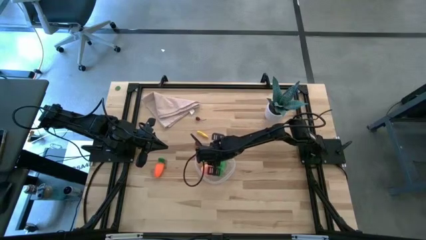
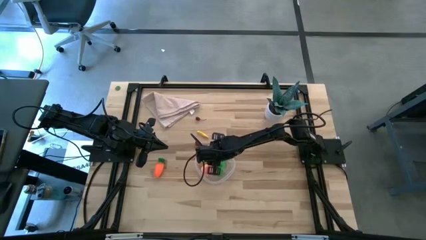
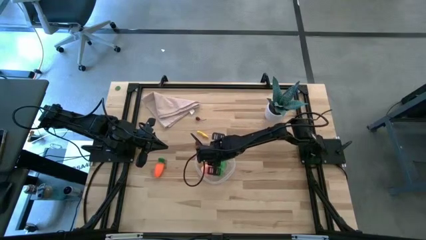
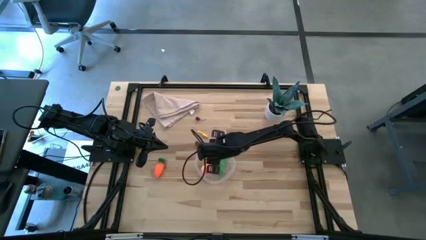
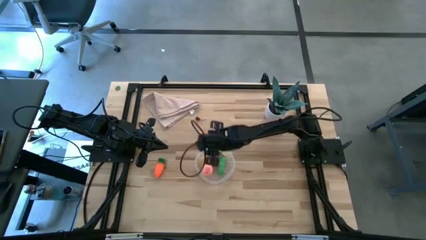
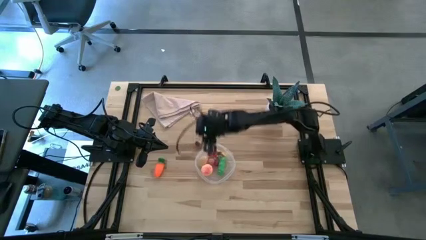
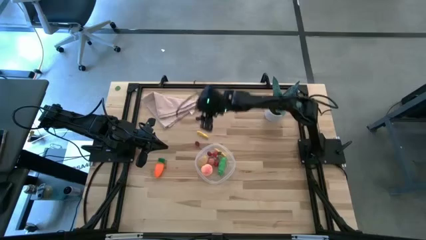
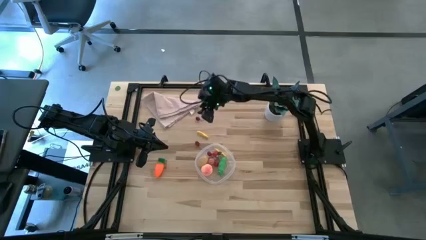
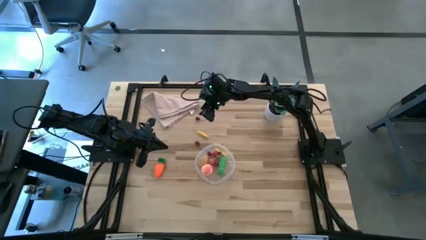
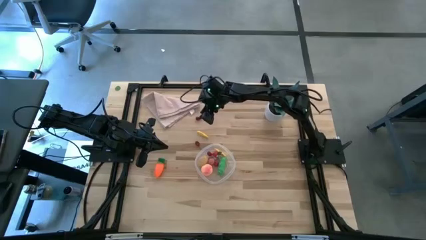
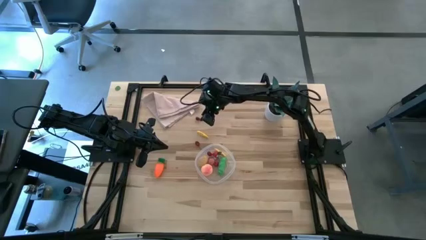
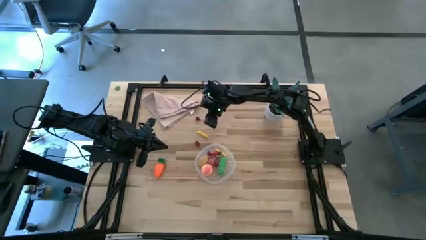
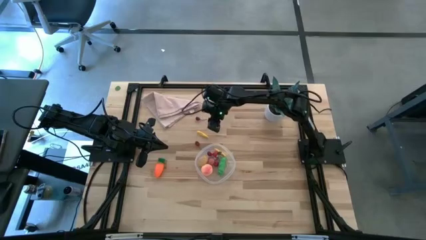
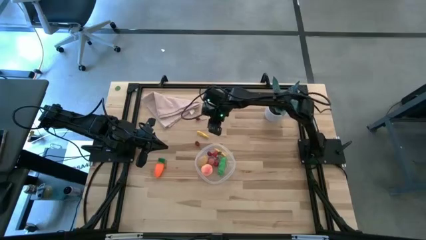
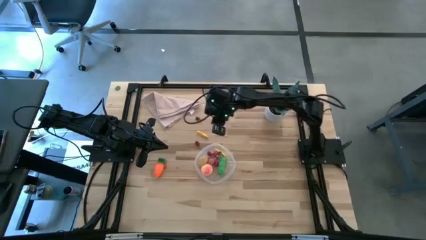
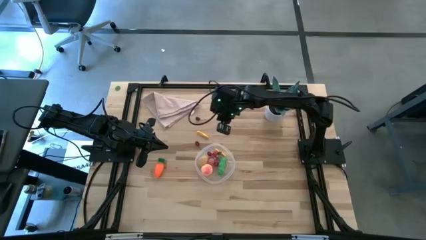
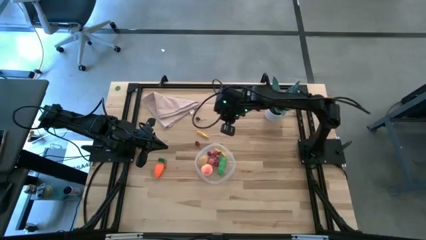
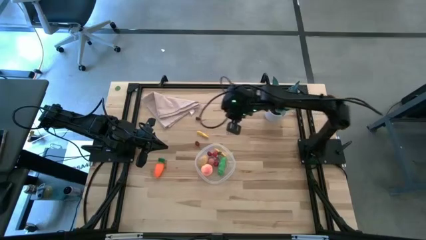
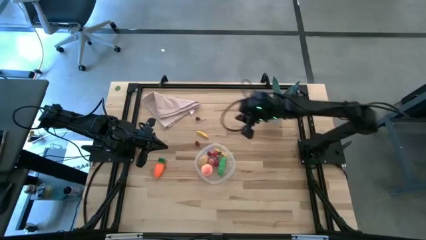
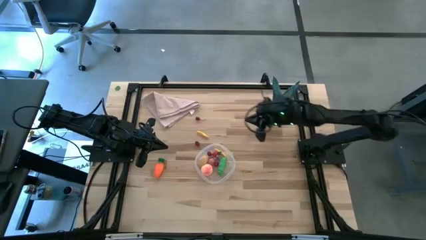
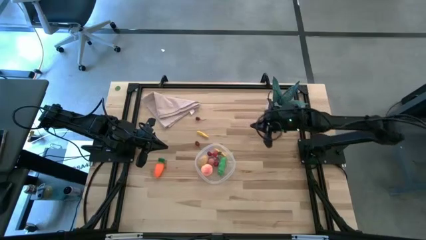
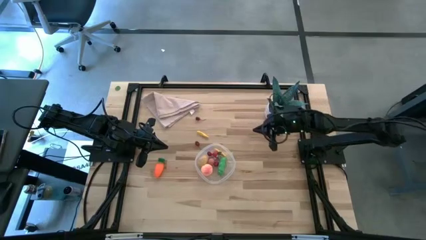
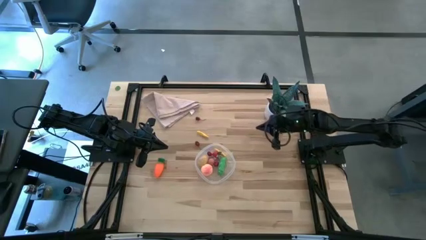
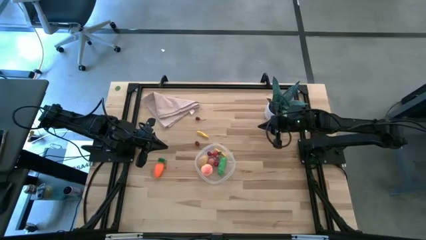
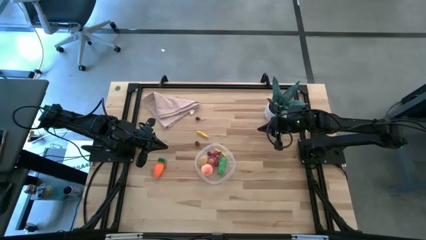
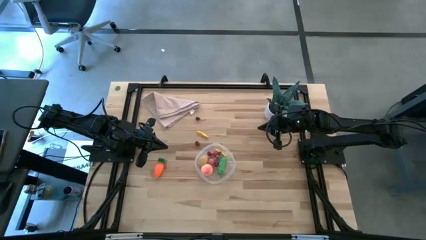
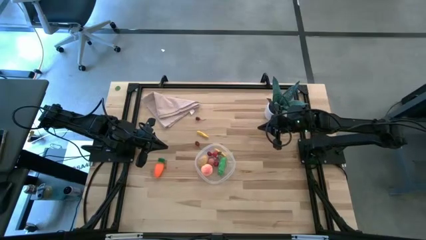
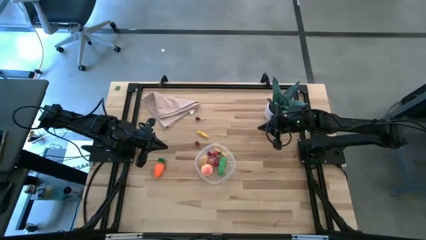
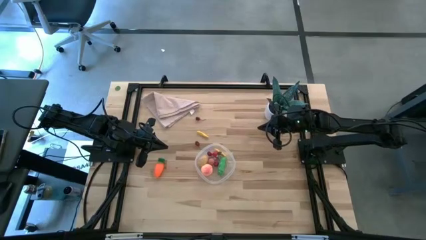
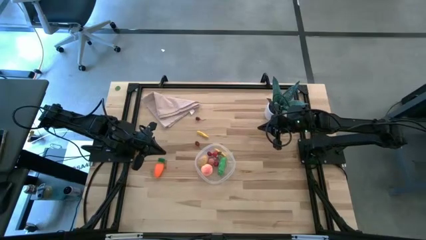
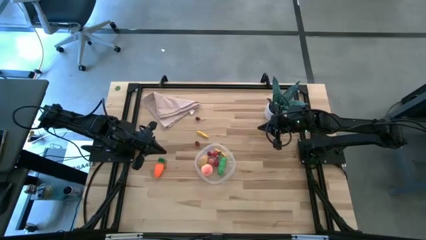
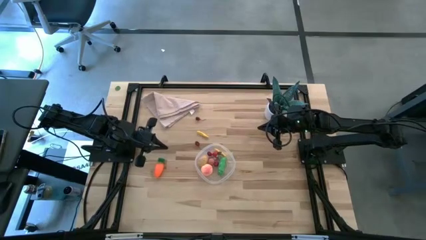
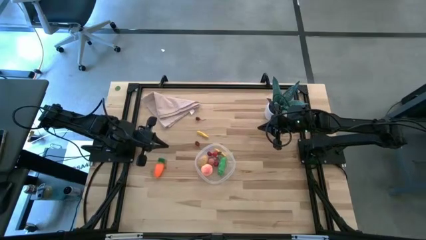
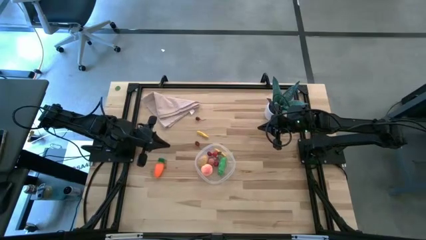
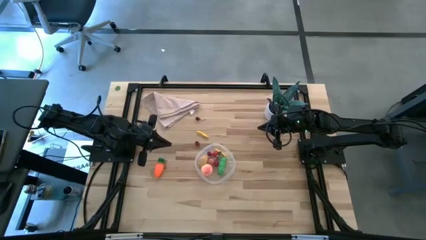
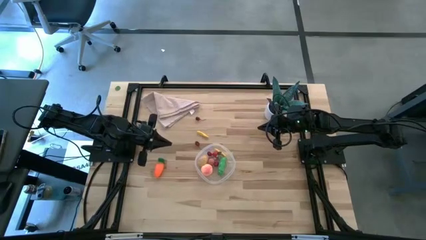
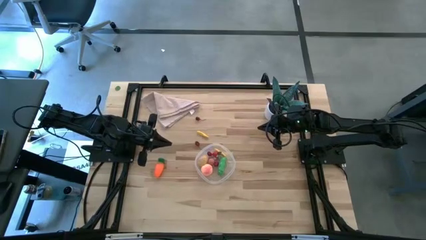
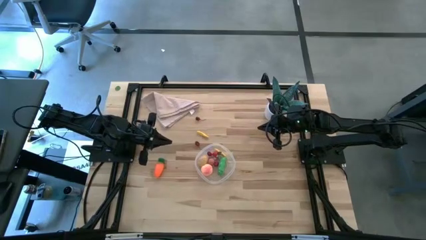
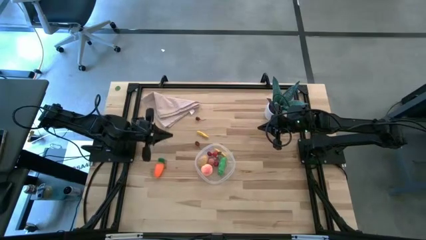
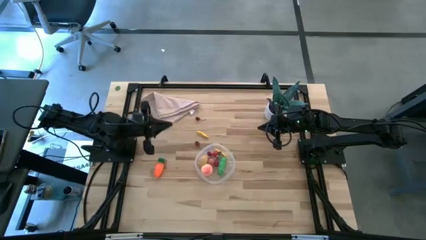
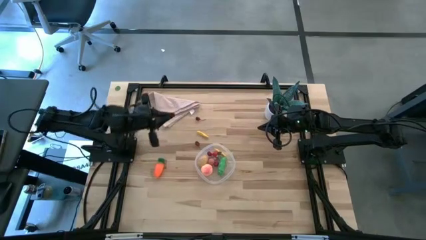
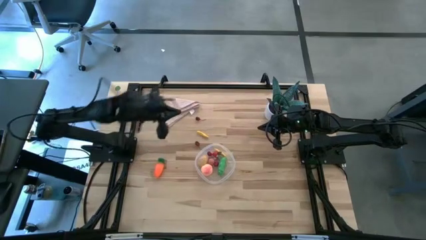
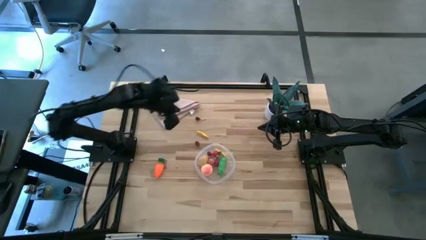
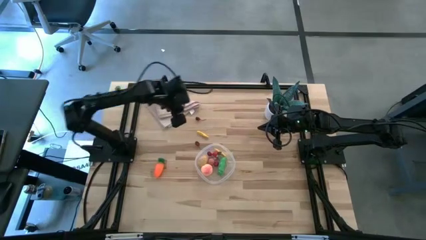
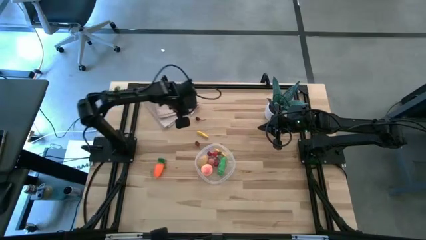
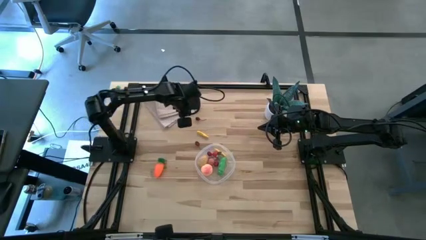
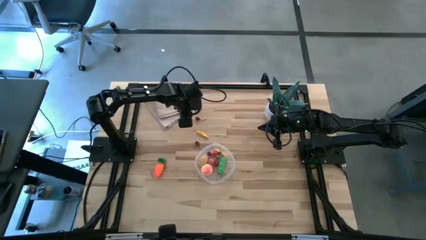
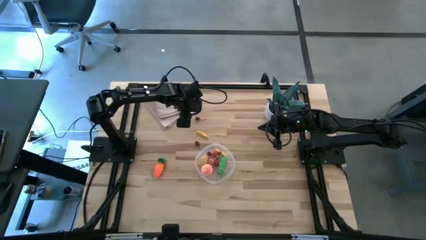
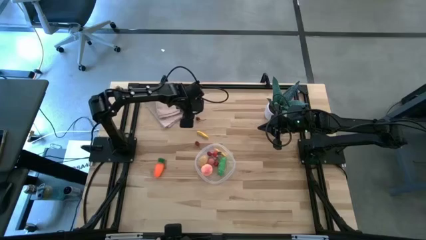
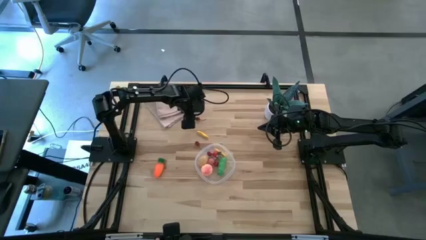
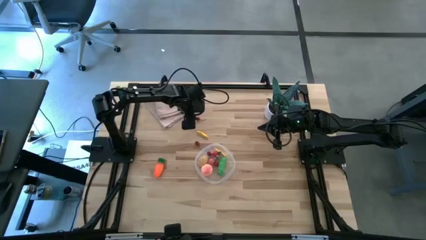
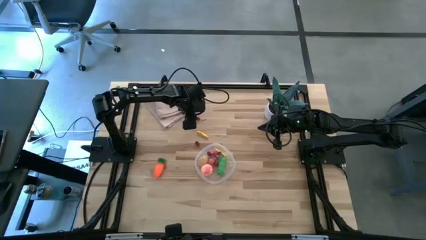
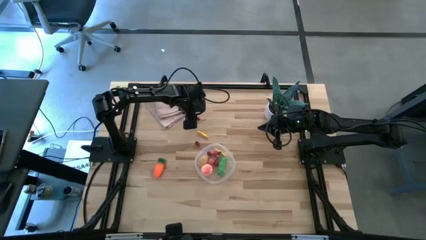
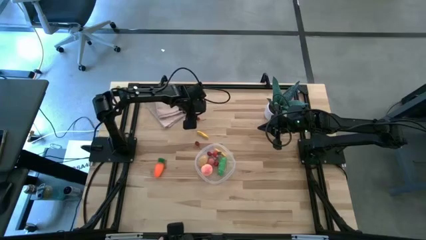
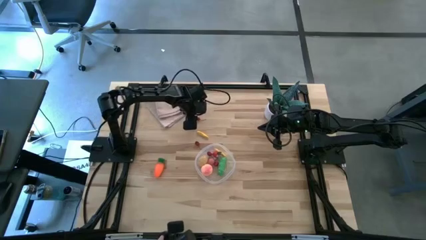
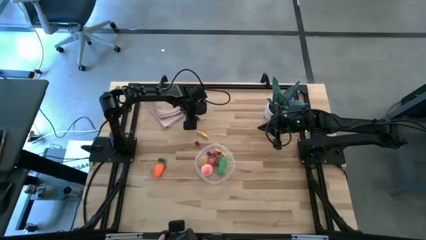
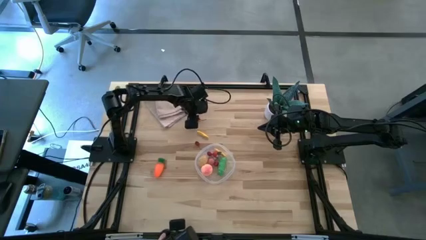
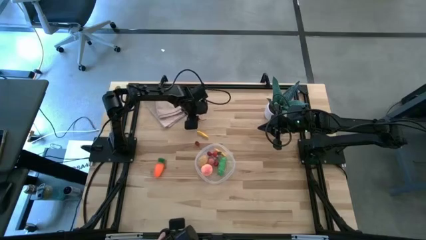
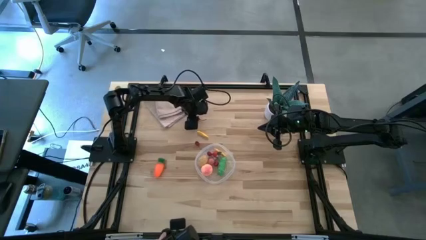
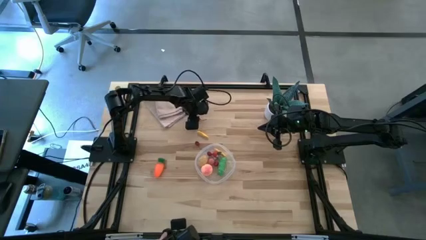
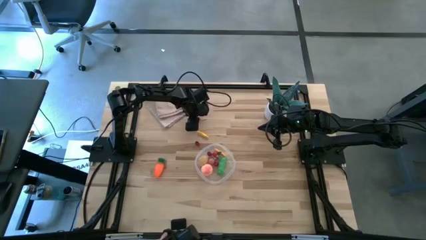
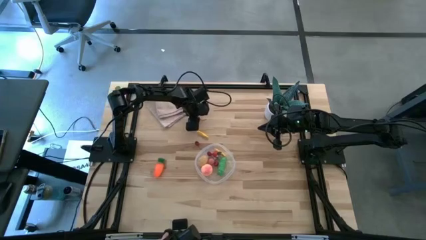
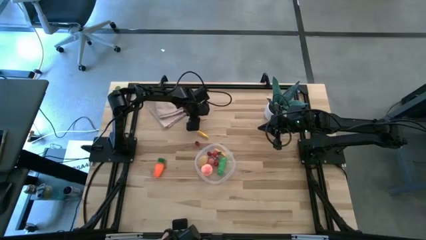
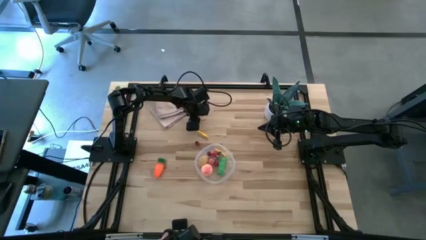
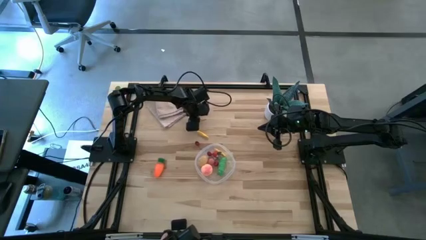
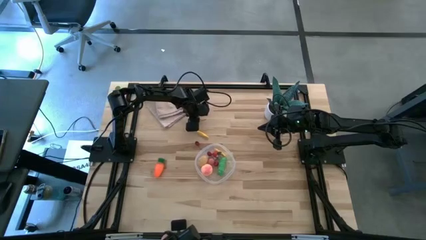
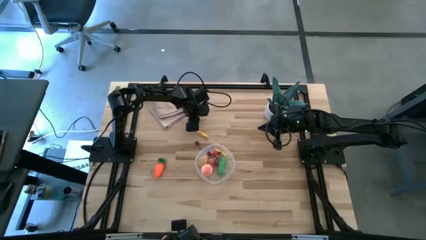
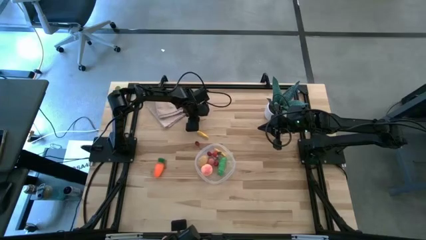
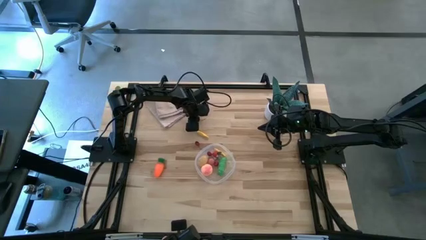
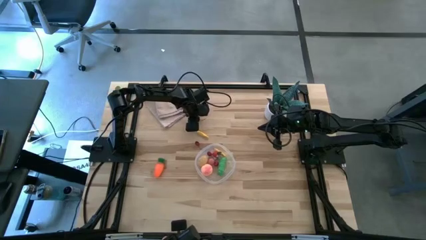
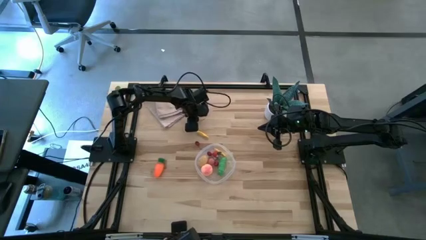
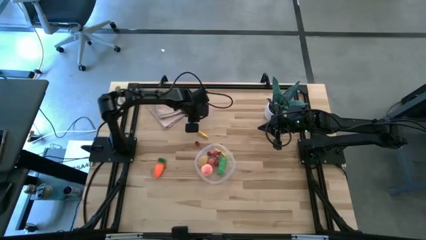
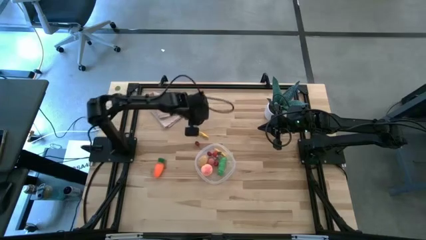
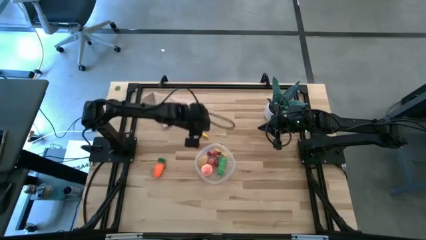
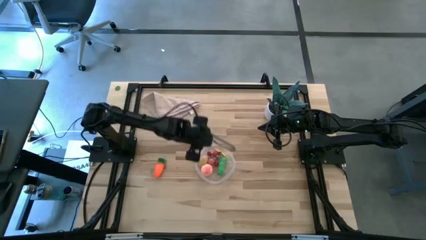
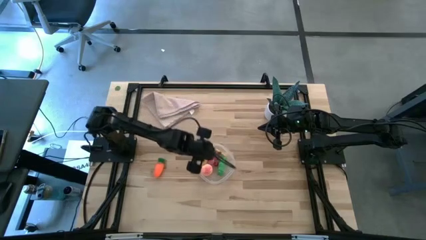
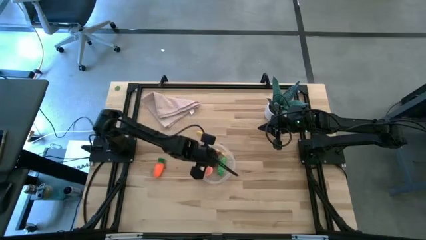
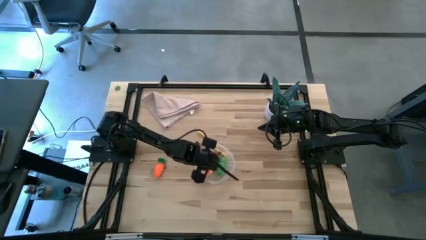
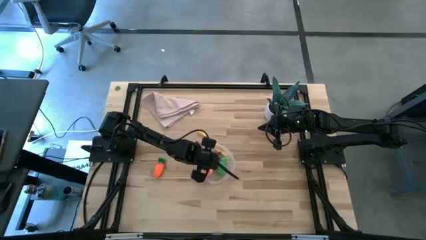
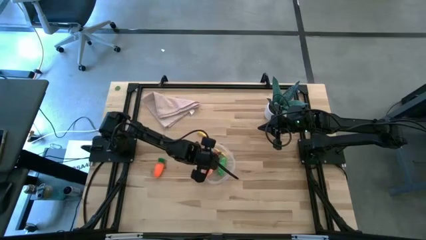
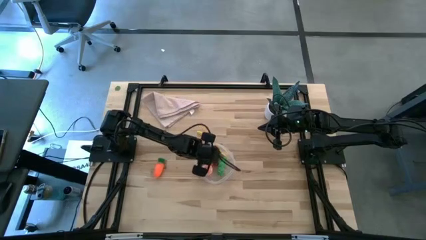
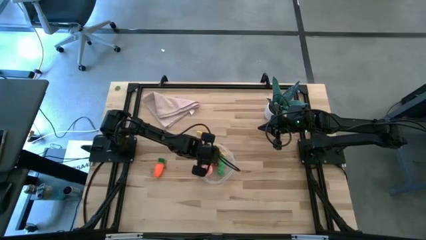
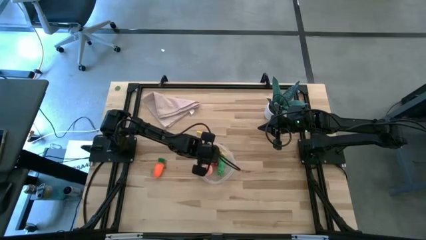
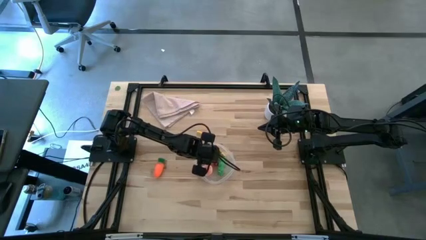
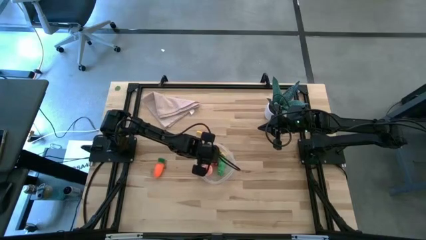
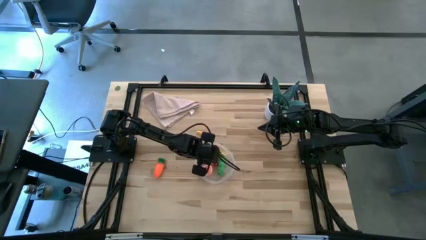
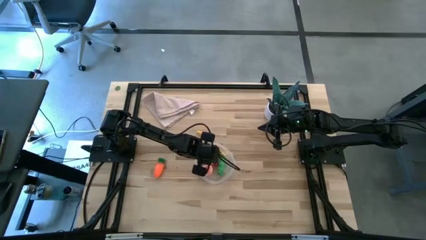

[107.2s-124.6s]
Task: Pick and placing Produce into tupperware
Put the red cherry into the transparent bin
